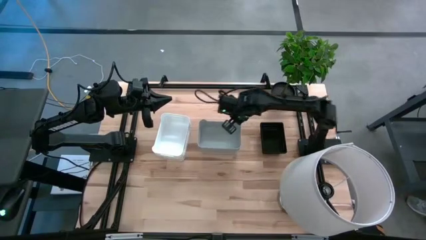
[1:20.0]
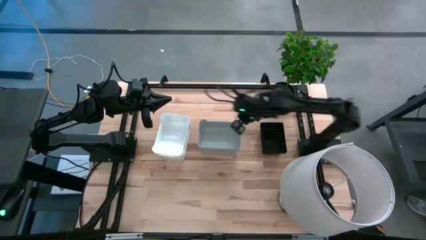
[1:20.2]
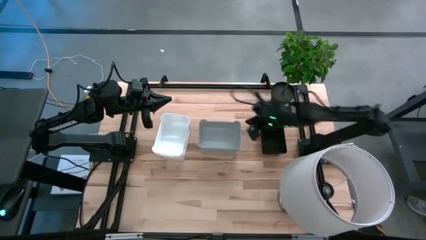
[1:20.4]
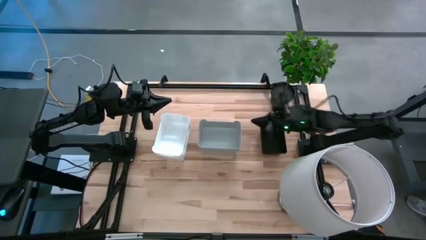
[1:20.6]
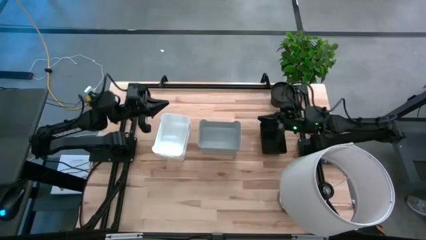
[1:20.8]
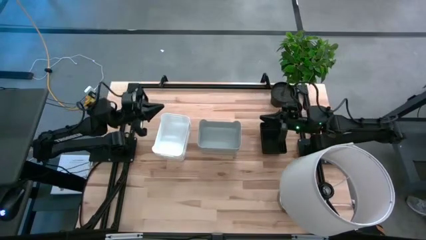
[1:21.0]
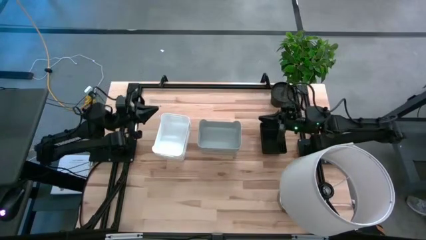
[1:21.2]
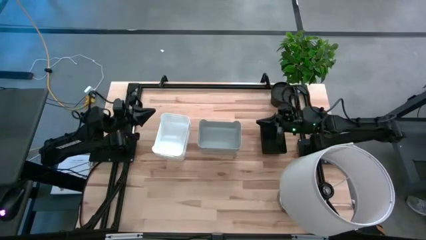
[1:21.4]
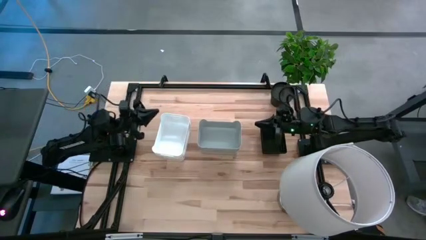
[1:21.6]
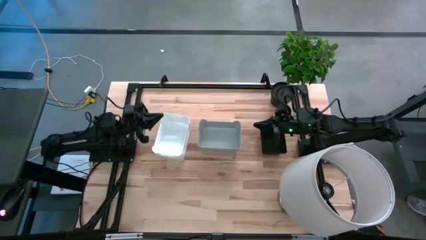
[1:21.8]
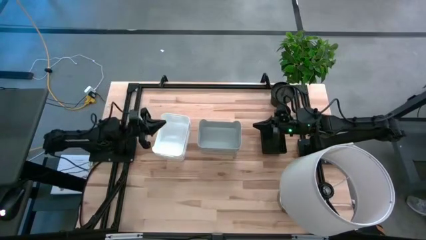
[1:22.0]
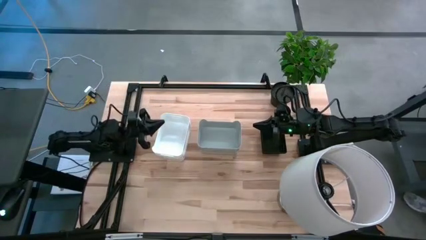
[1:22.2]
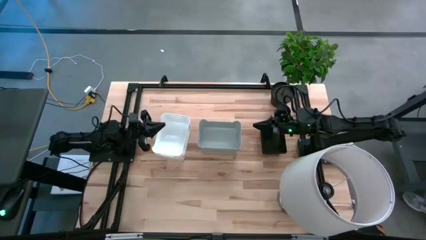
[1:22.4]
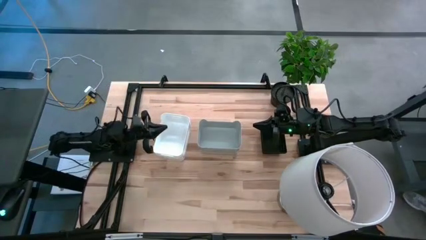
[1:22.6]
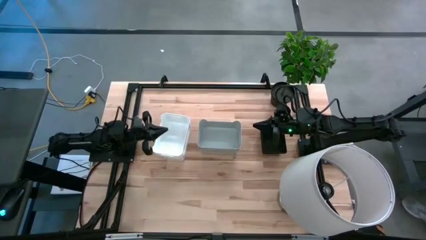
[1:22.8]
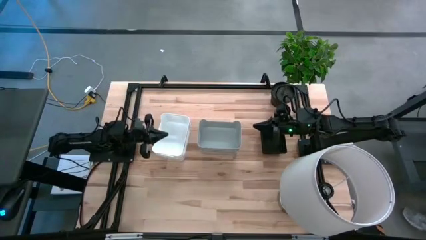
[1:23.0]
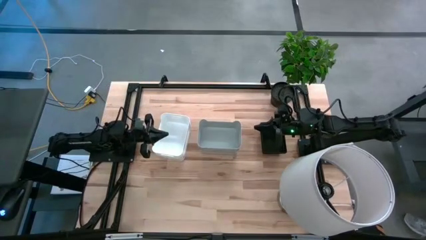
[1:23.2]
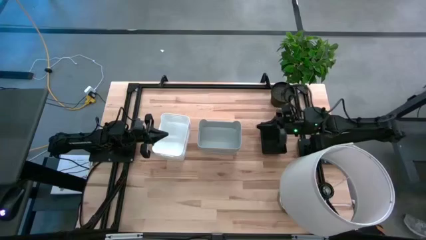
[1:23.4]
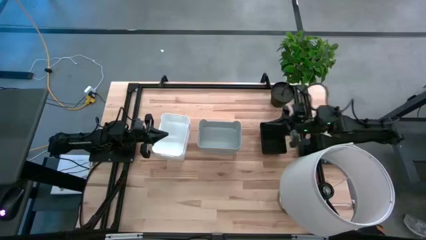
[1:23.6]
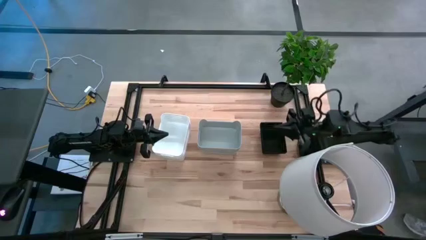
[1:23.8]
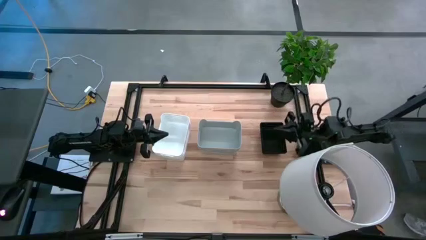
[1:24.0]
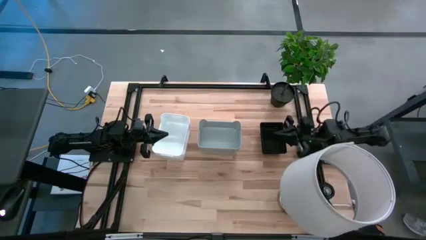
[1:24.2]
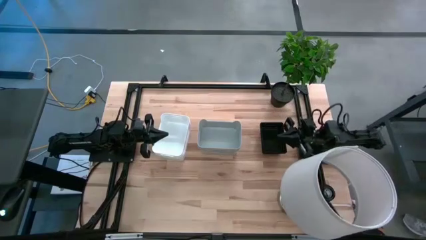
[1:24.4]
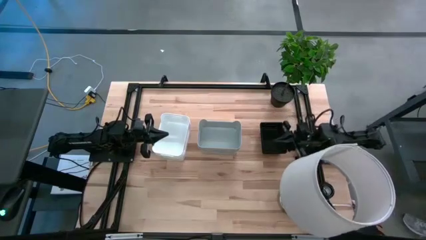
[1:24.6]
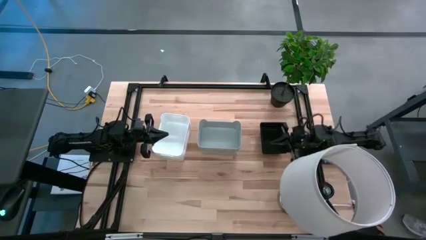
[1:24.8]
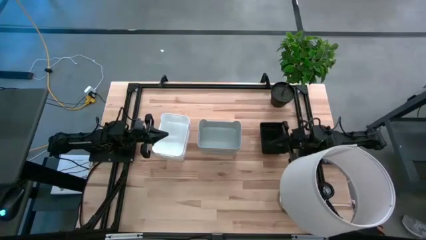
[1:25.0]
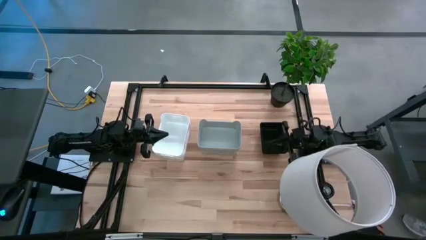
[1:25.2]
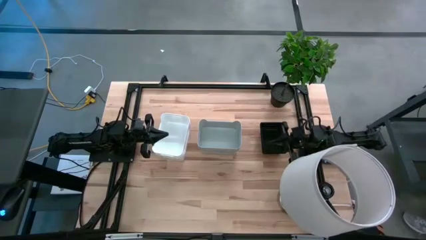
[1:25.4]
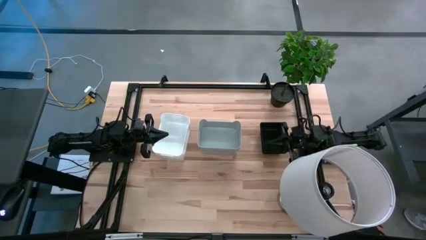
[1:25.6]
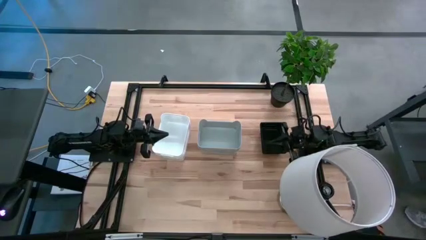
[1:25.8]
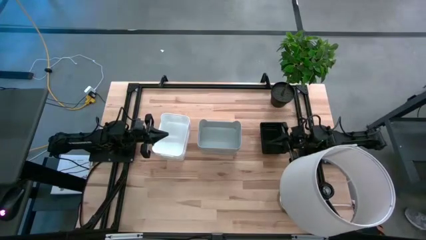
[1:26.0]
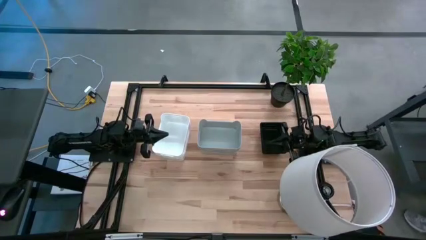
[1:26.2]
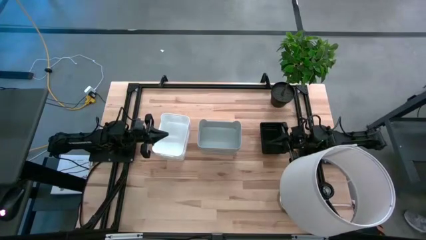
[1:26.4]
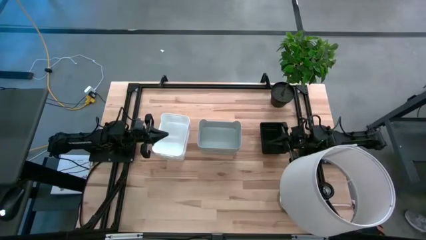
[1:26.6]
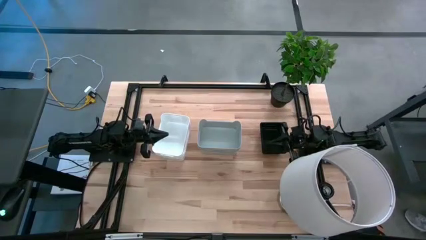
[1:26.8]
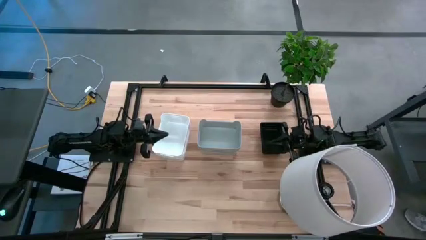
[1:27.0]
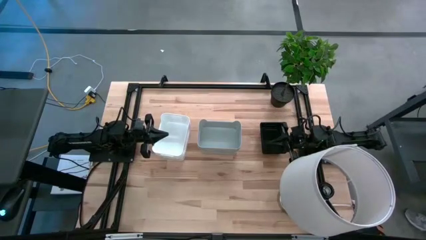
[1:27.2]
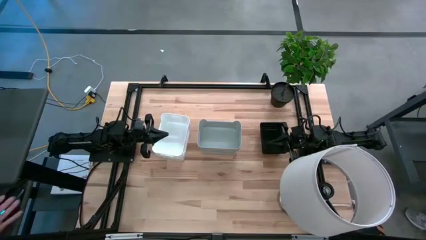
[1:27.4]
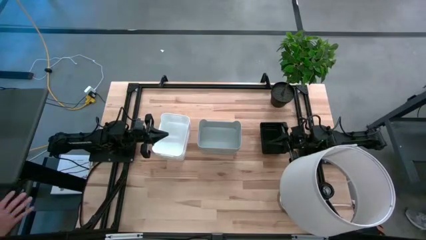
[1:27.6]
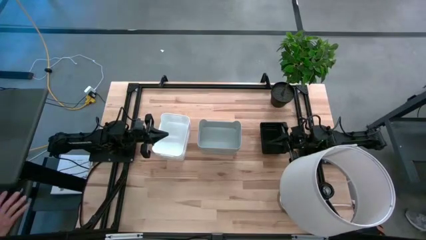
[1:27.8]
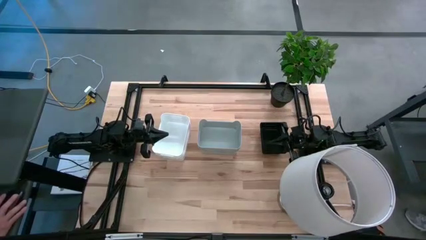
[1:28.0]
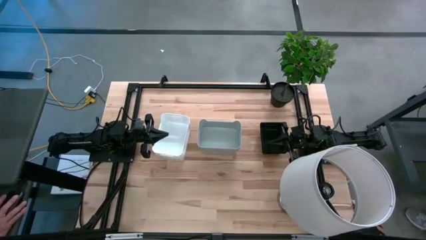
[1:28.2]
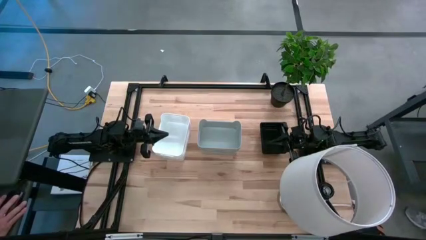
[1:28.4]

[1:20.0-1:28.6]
Return to Home Position
